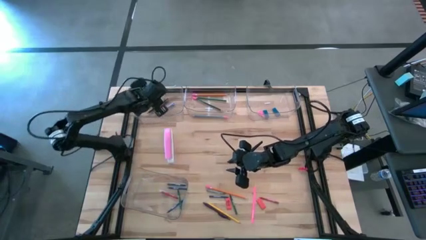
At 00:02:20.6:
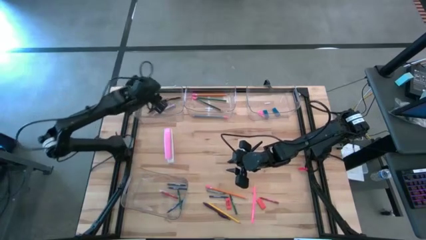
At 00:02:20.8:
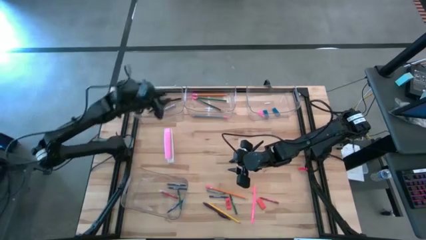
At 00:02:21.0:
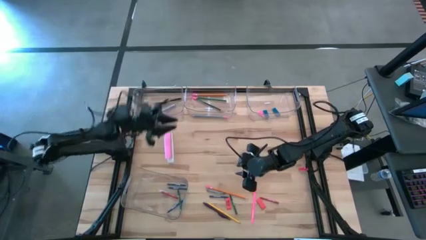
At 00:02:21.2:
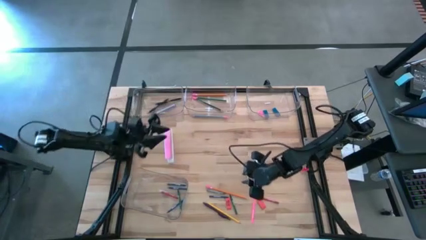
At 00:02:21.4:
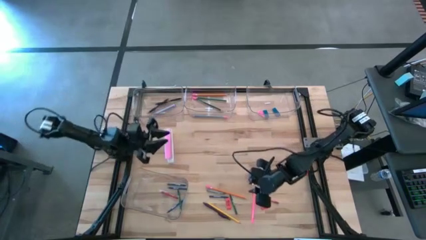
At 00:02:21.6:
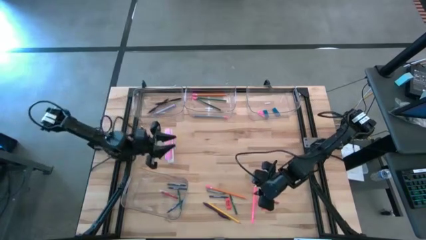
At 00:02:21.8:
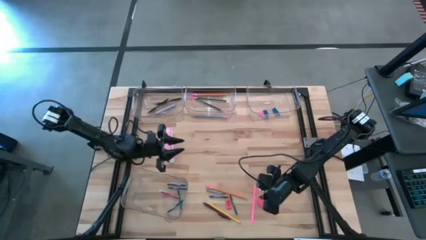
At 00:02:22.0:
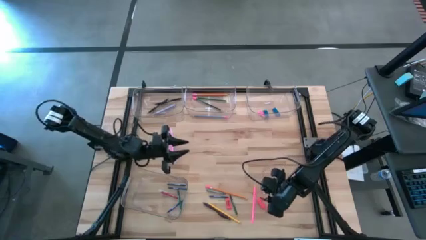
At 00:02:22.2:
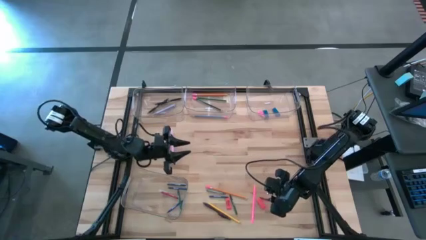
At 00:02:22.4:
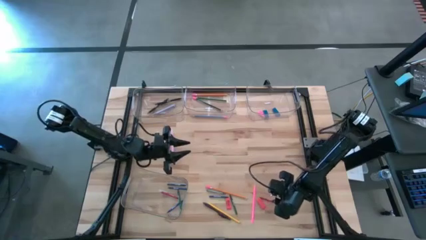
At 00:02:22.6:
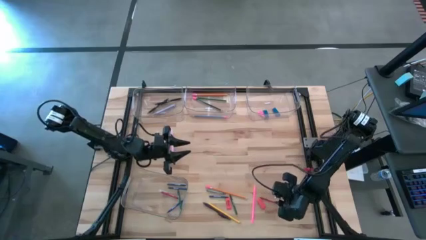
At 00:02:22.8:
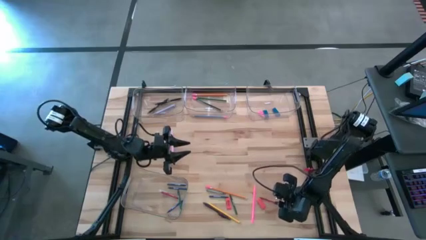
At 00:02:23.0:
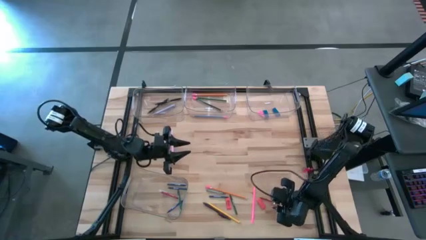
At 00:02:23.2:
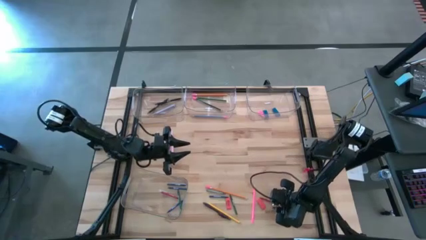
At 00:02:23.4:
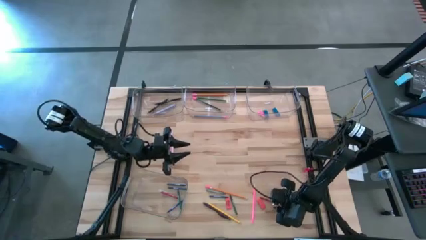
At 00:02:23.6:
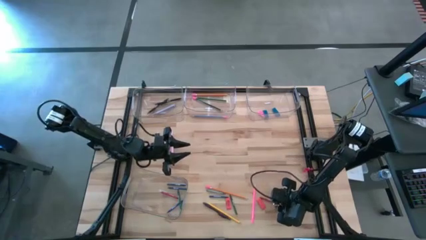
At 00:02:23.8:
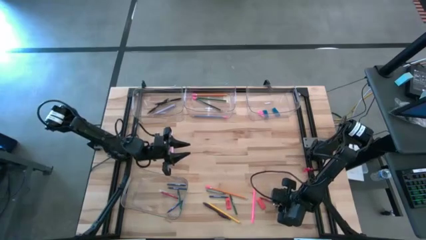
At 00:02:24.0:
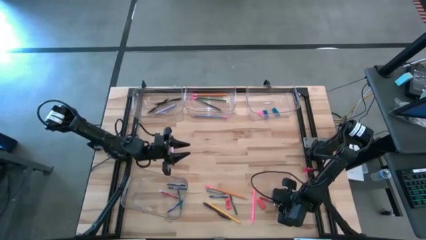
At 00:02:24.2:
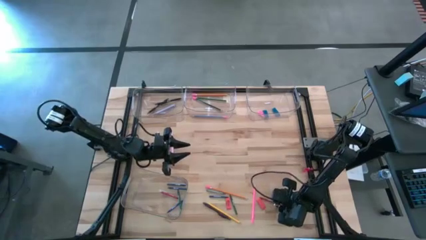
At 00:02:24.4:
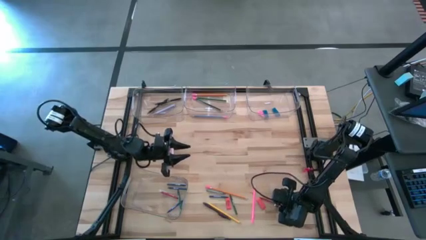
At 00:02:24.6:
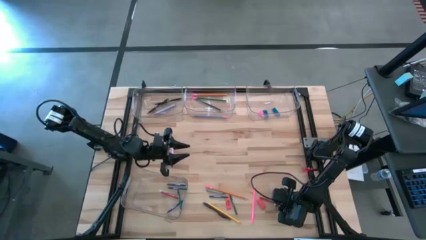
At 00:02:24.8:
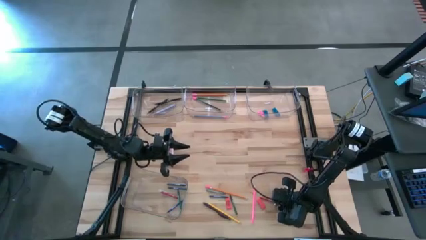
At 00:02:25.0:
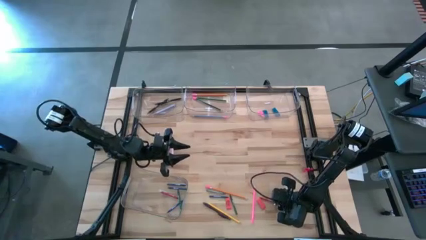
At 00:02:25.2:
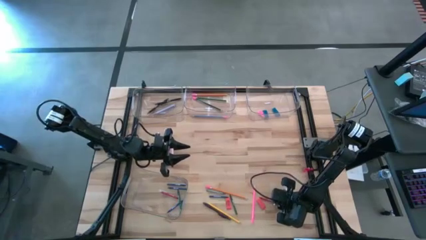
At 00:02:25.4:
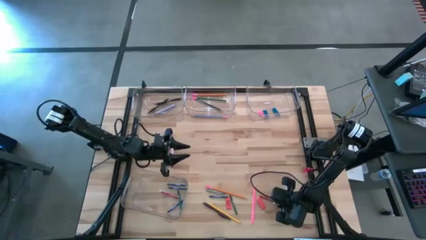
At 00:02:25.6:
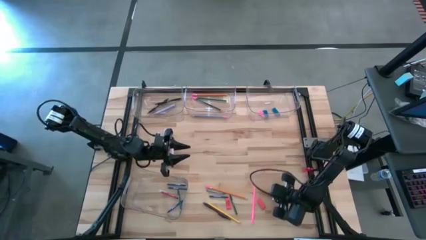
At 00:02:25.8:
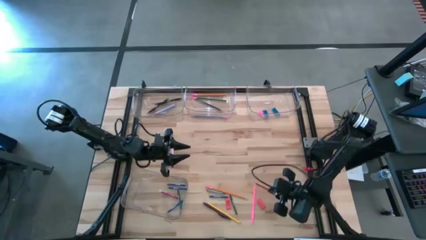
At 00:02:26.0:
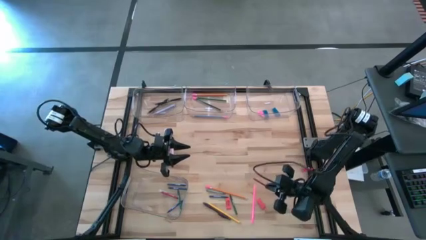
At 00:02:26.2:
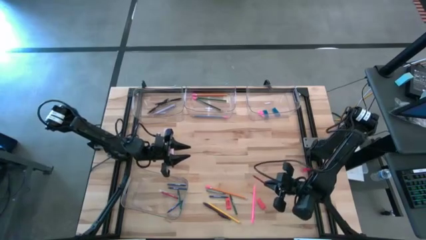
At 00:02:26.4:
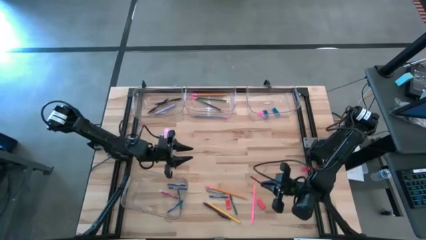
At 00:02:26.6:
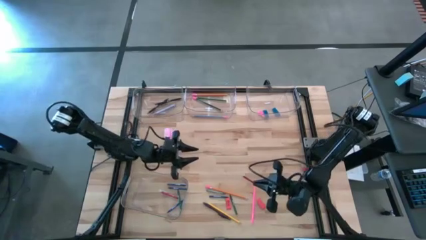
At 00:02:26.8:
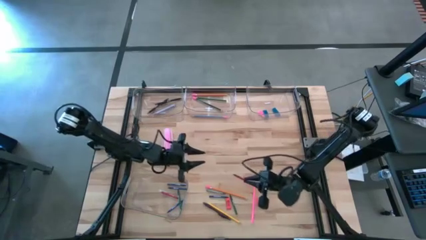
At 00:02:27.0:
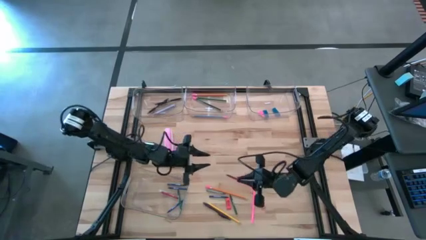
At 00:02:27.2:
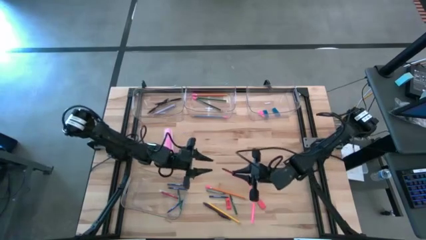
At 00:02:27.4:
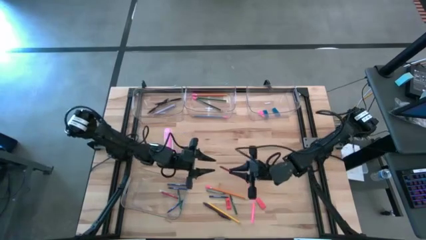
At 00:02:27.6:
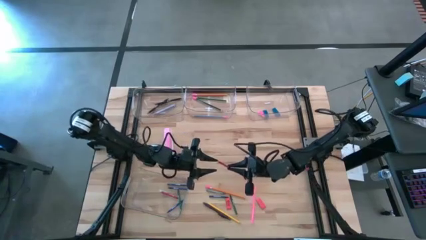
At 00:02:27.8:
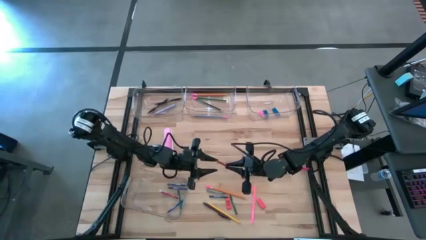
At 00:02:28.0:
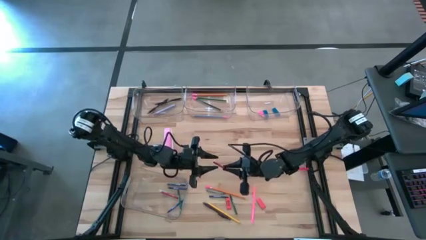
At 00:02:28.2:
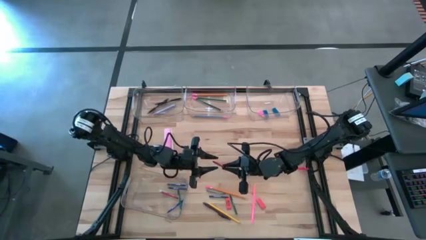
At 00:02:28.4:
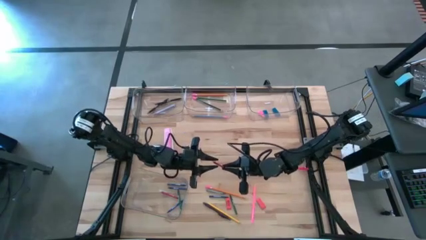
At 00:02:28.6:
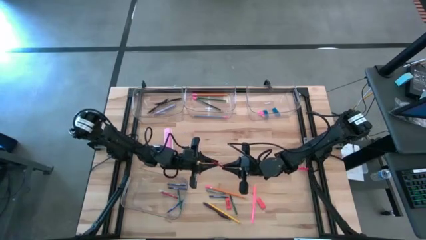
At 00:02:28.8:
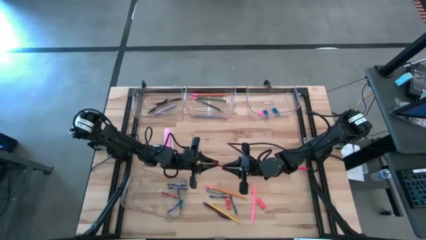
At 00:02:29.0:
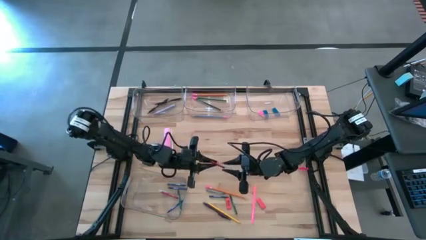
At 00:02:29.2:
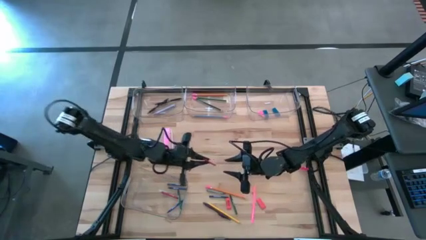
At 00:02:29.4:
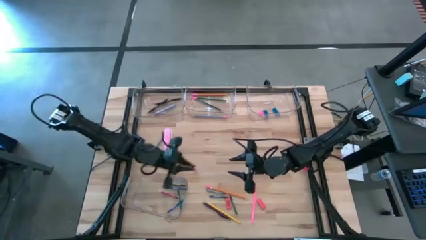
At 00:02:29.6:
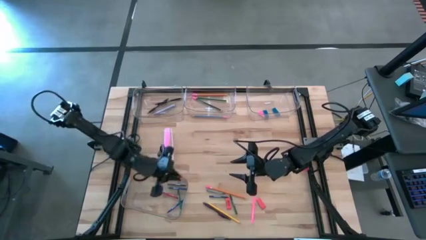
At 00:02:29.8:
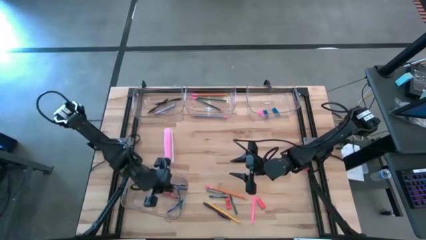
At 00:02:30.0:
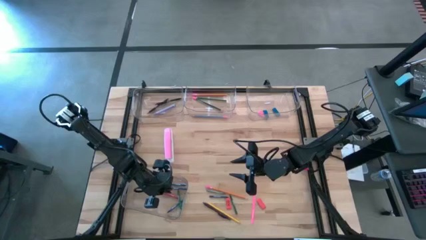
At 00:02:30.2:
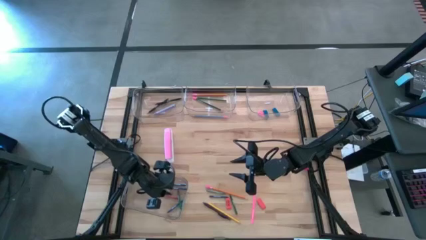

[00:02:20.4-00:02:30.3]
Task: Sort crayons/erasers/pens/pencils in bins
Put the red crayon into the bottom left transparent bin

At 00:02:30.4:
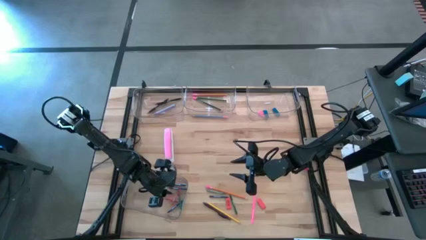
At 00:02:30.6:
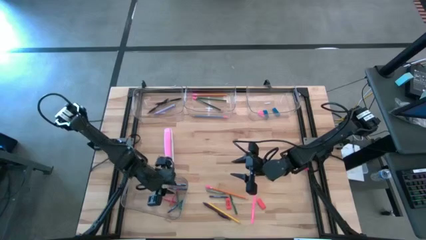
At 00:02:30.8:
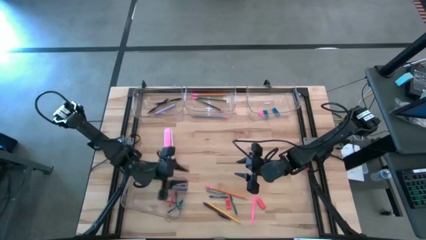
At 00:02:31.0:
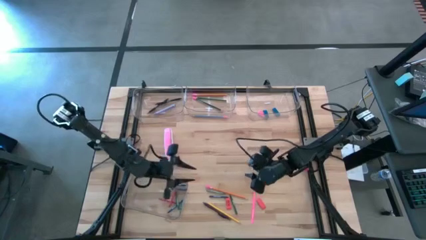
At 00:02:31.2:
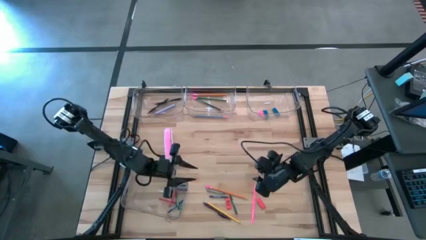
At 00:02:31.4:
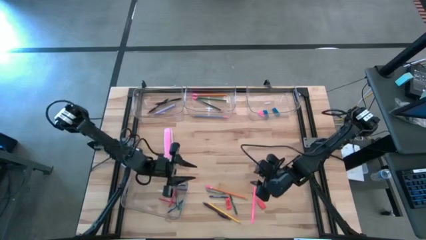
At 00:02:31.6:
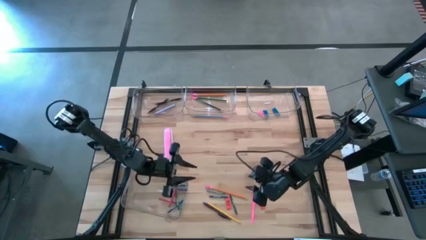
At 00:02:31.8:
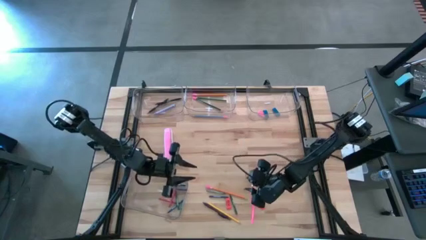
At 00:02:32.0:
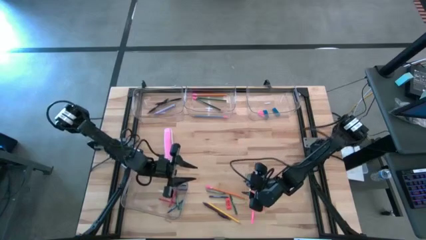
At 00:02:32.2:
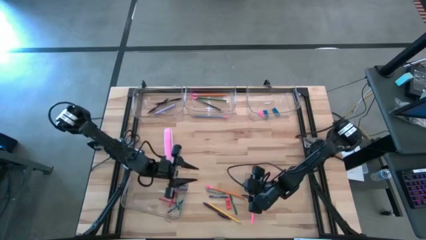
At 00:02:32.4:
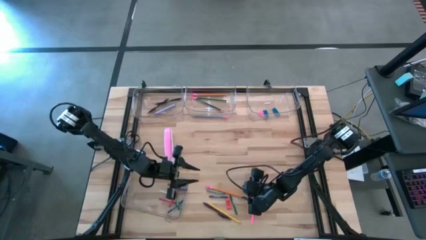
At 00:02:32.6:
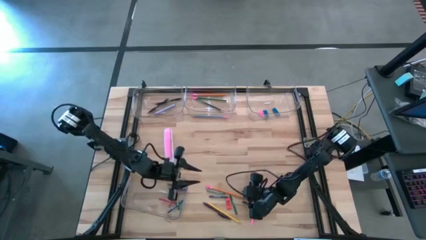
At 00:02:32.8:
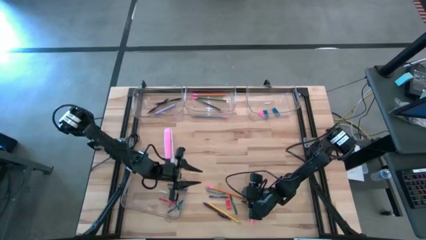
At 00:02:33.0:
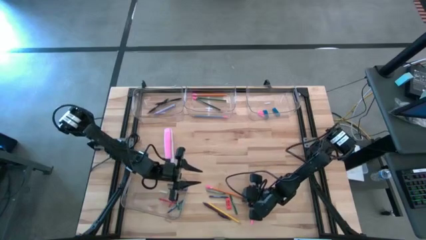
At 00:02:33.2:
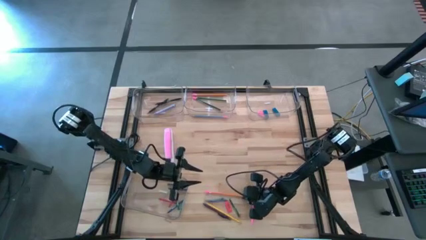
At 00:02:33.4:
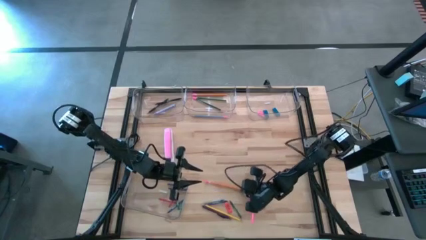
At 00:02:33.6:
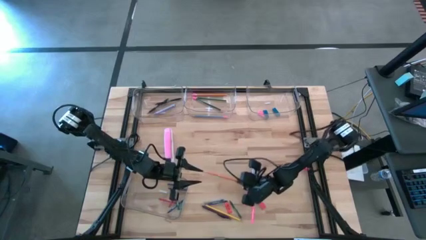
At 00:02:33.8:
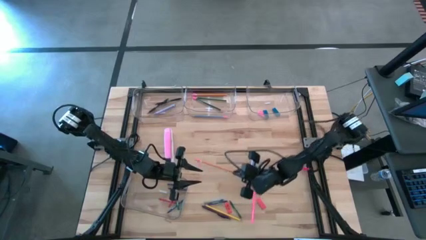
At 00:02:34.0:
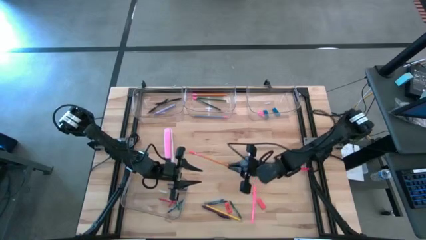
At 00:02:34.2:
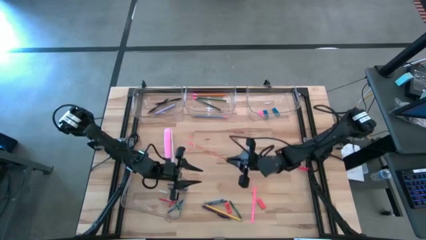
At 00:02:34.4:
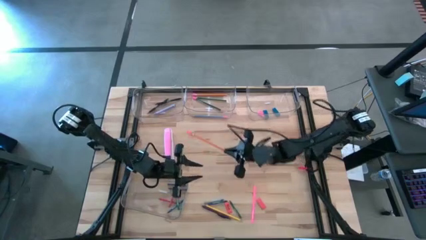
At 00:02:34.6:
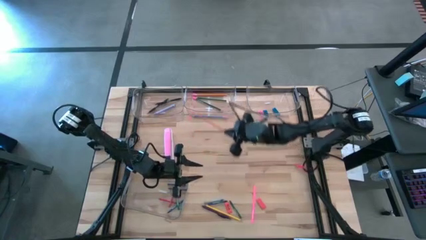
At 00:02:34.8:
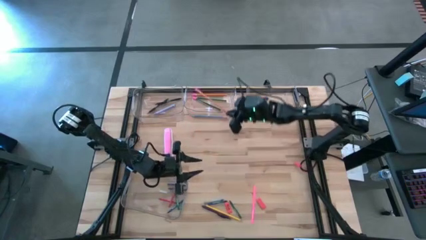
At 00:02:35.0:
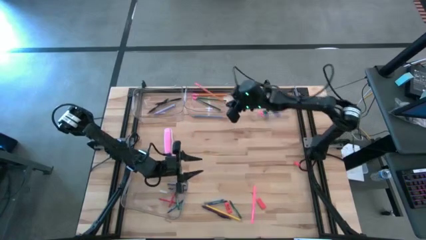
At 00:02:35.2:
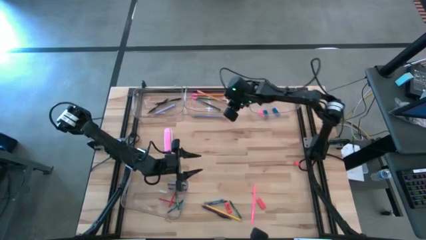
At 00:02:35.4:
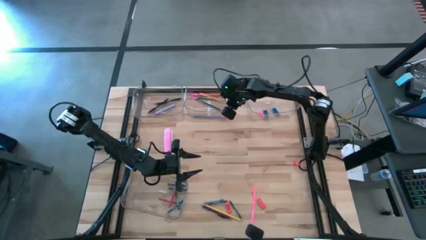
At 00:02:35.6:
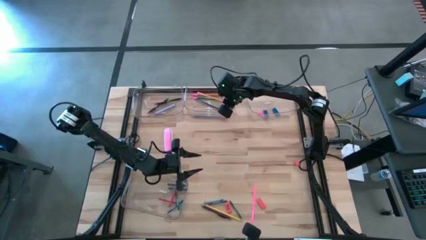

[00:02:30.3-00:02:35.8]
Put the orange pencil into the top middle transparent bin
